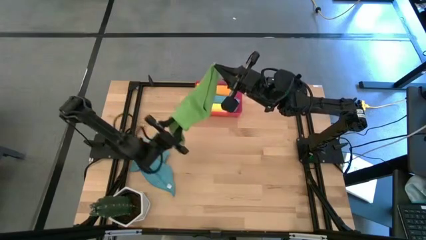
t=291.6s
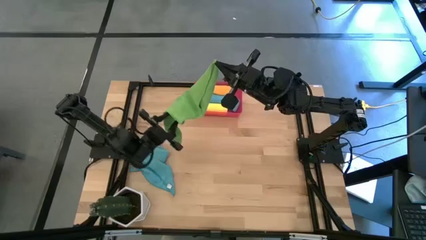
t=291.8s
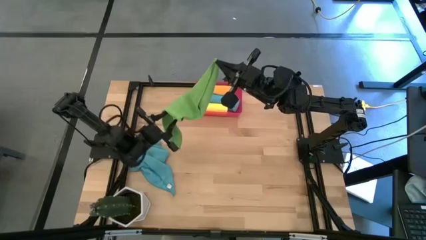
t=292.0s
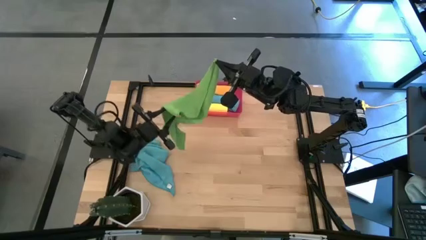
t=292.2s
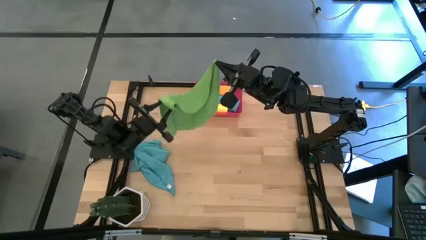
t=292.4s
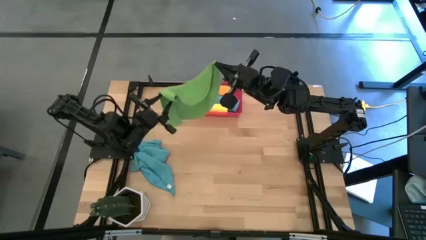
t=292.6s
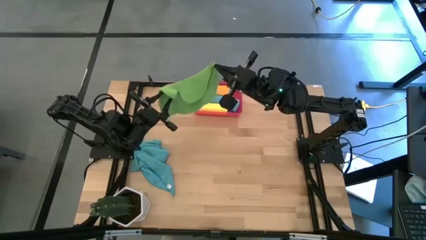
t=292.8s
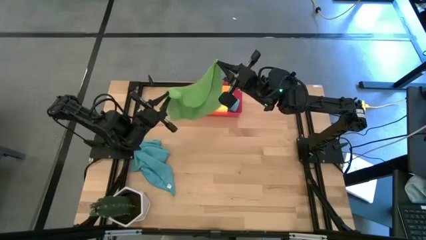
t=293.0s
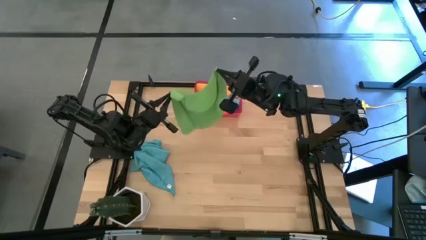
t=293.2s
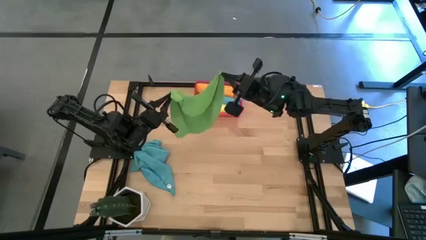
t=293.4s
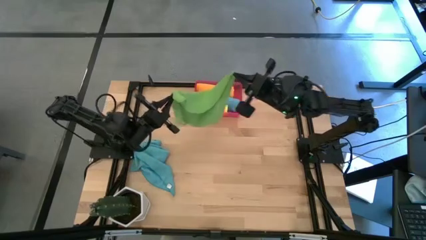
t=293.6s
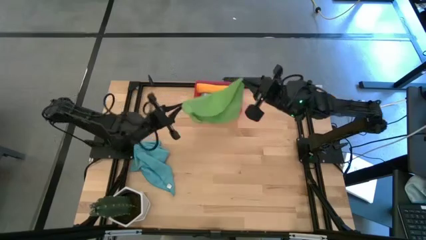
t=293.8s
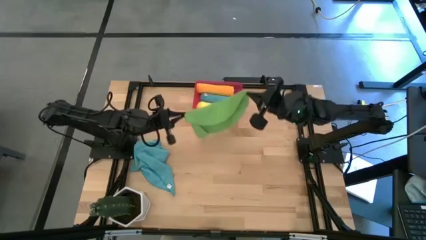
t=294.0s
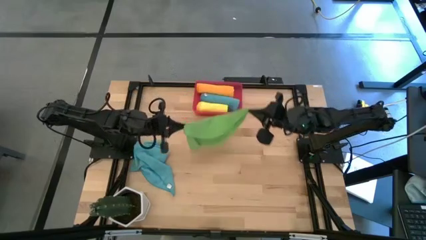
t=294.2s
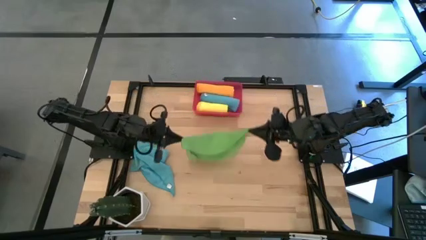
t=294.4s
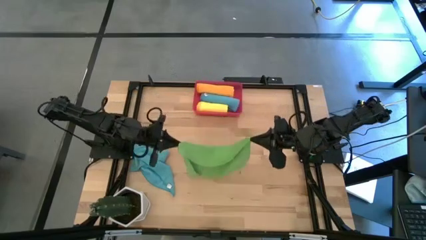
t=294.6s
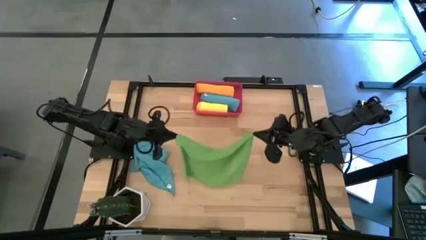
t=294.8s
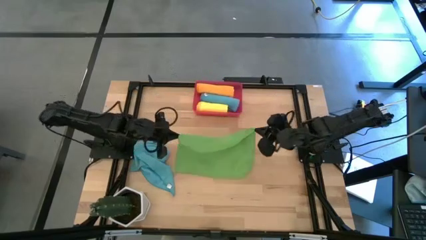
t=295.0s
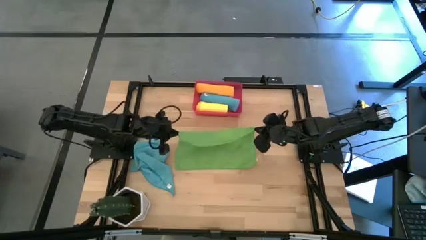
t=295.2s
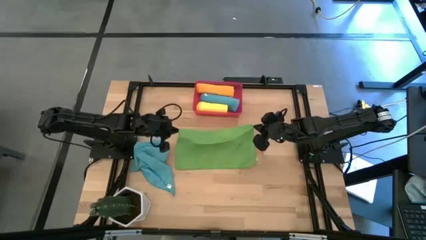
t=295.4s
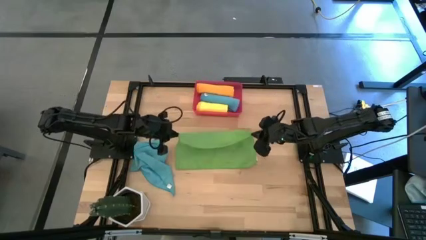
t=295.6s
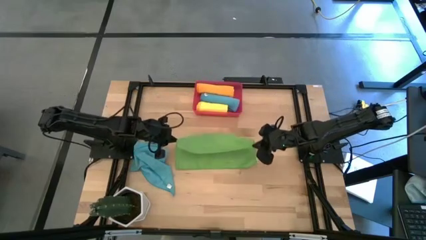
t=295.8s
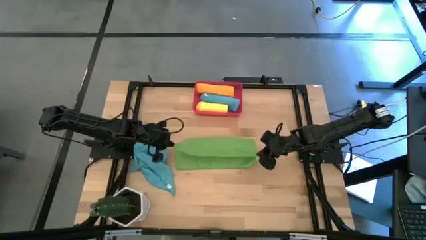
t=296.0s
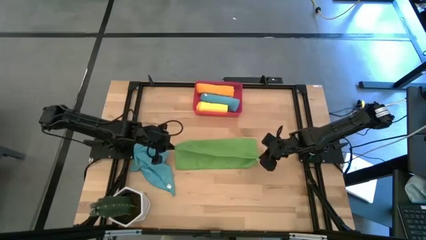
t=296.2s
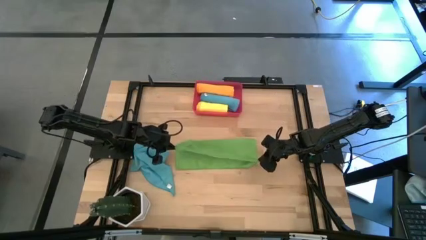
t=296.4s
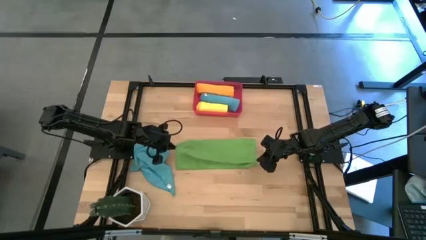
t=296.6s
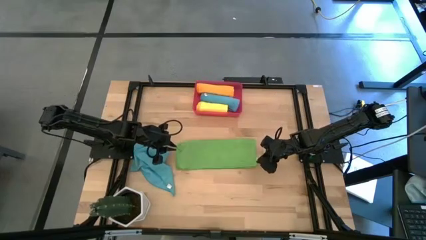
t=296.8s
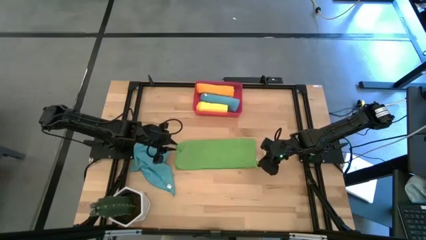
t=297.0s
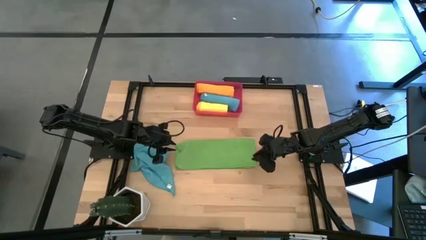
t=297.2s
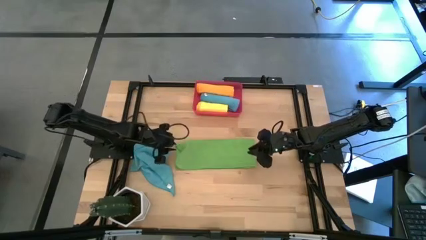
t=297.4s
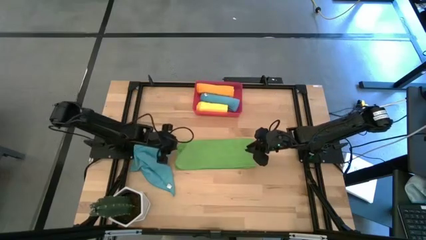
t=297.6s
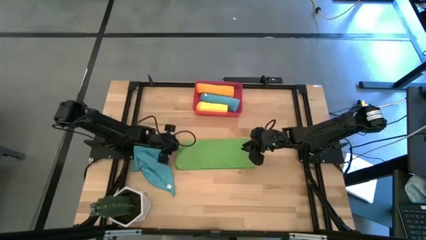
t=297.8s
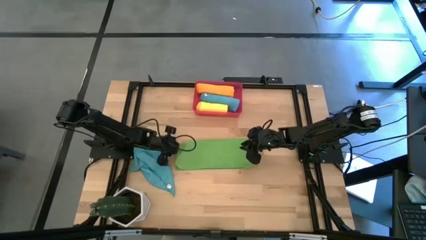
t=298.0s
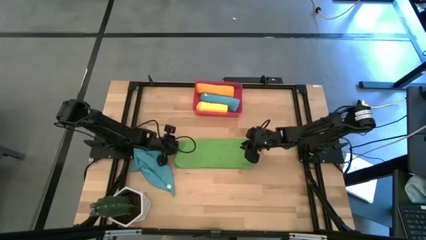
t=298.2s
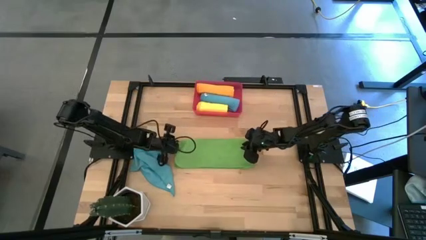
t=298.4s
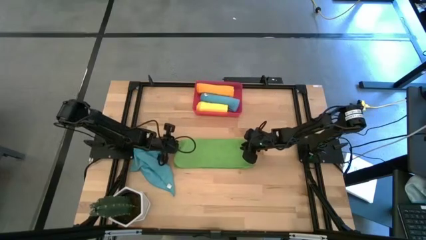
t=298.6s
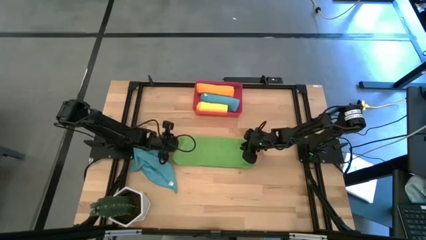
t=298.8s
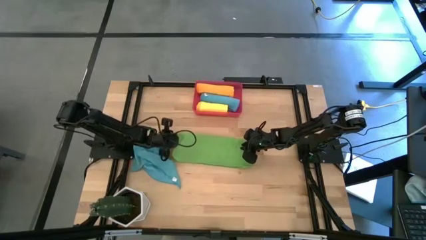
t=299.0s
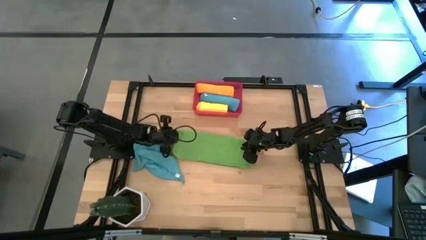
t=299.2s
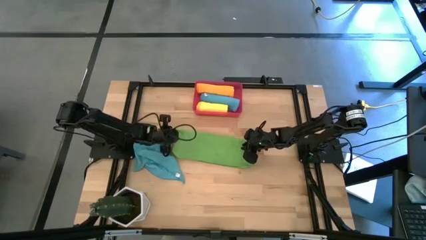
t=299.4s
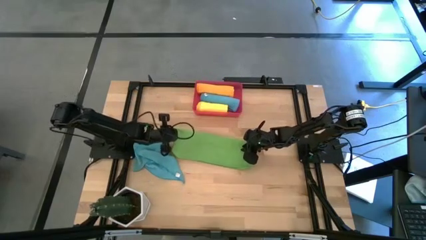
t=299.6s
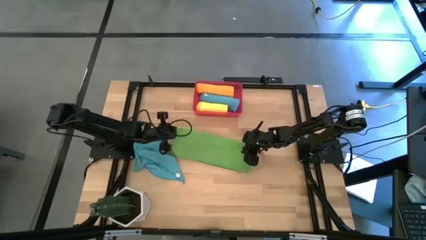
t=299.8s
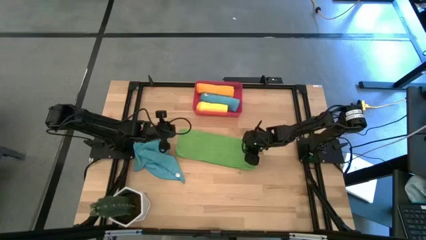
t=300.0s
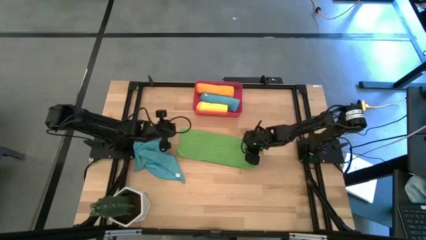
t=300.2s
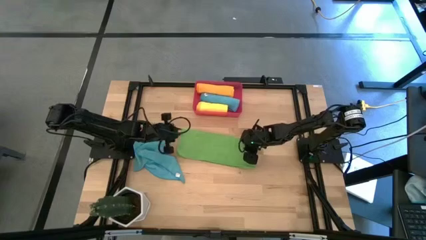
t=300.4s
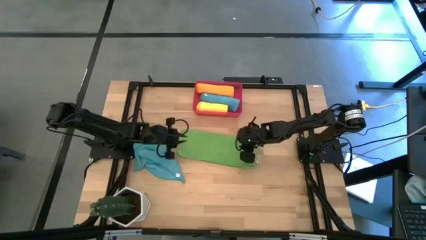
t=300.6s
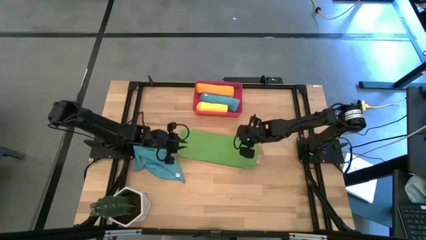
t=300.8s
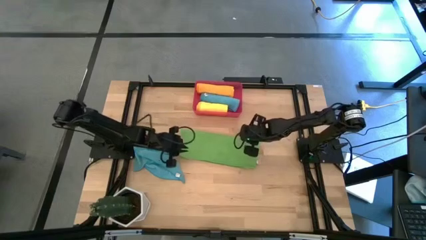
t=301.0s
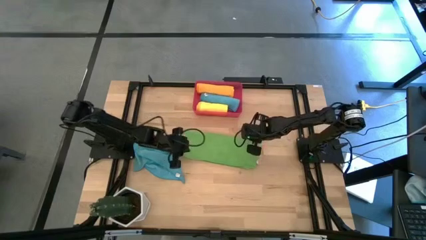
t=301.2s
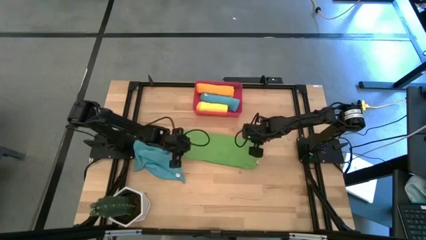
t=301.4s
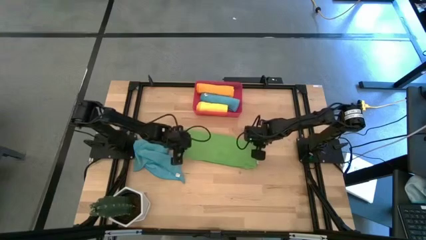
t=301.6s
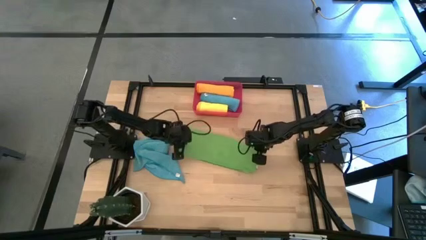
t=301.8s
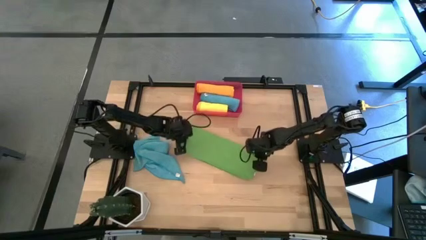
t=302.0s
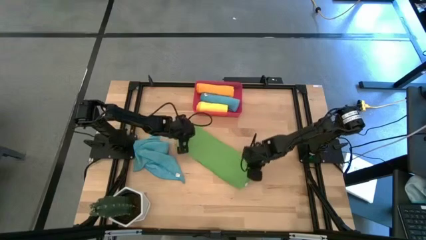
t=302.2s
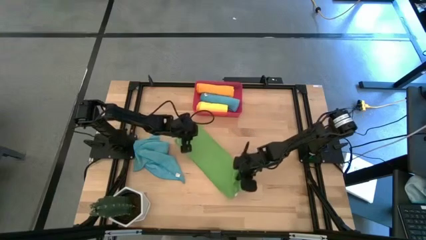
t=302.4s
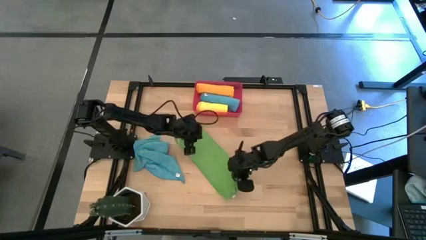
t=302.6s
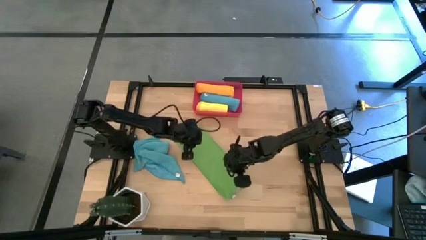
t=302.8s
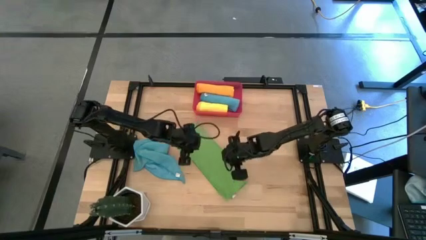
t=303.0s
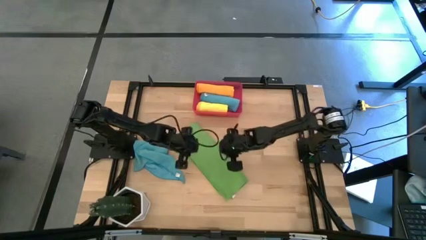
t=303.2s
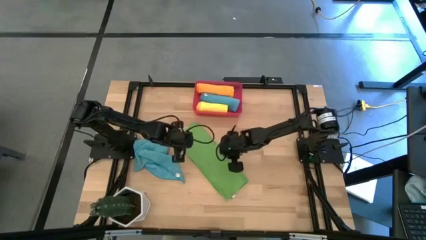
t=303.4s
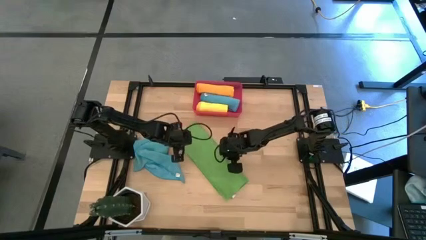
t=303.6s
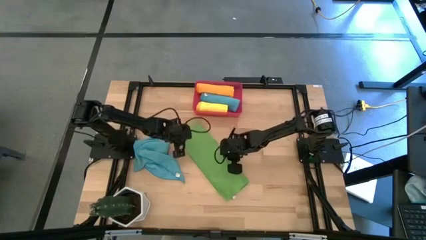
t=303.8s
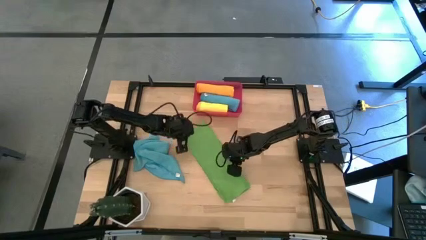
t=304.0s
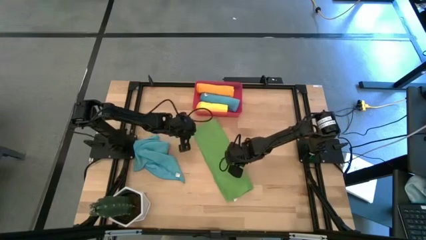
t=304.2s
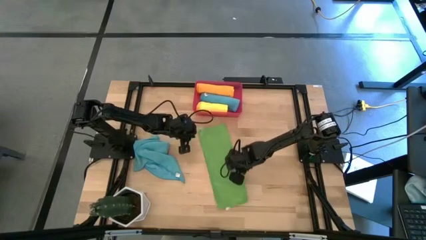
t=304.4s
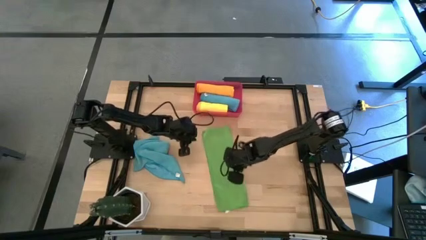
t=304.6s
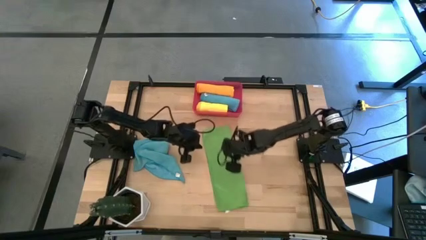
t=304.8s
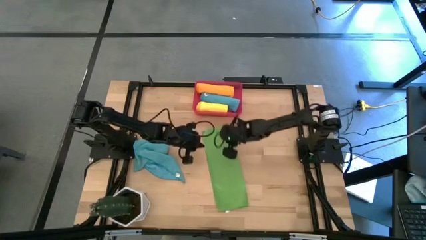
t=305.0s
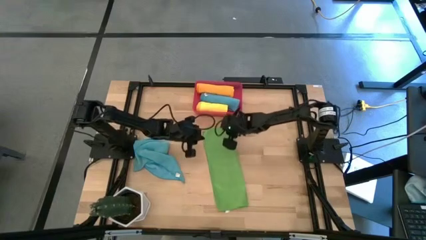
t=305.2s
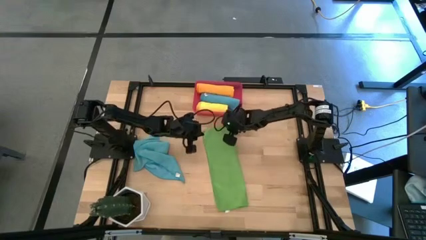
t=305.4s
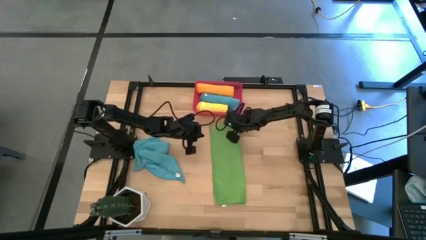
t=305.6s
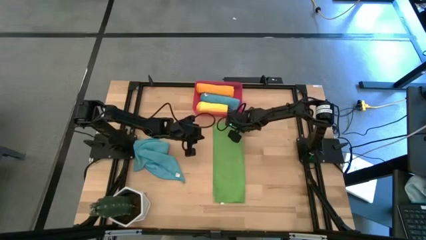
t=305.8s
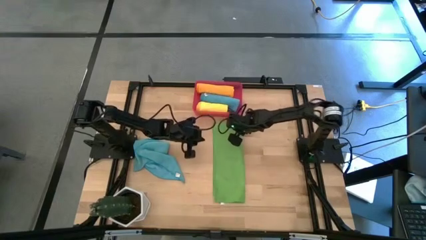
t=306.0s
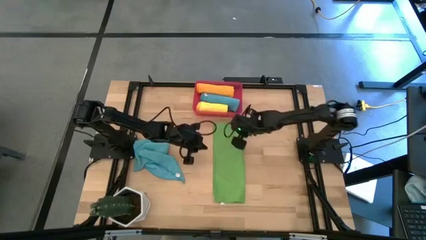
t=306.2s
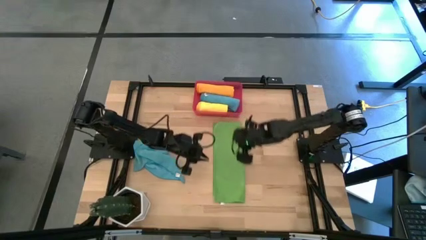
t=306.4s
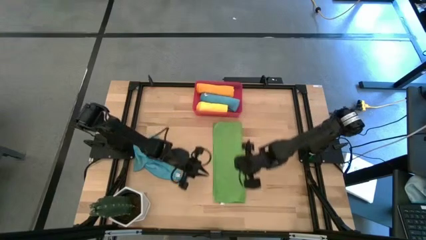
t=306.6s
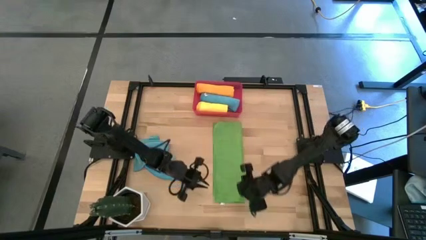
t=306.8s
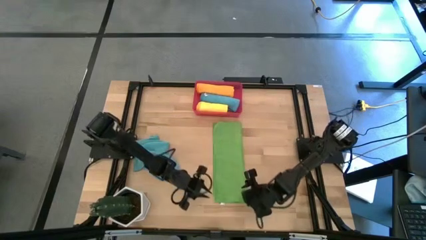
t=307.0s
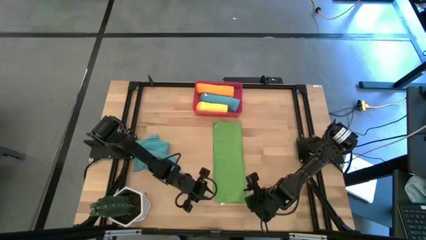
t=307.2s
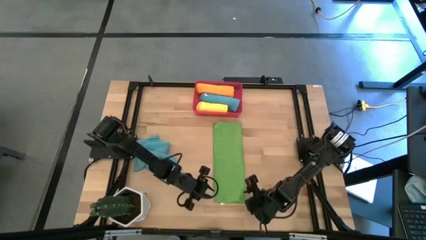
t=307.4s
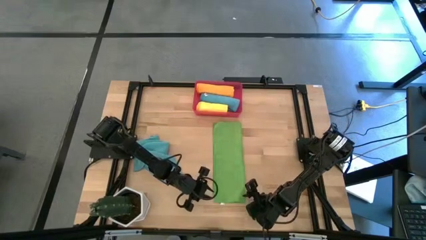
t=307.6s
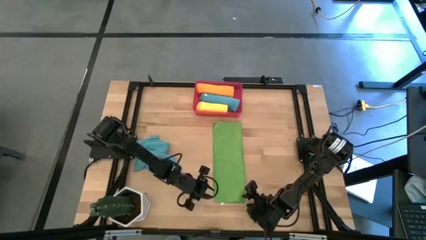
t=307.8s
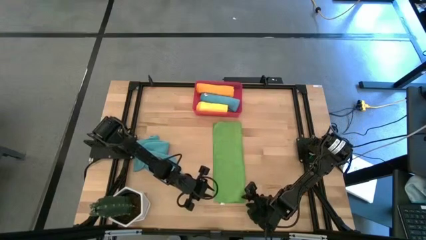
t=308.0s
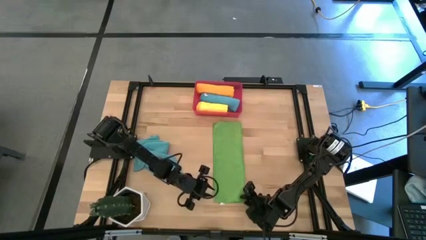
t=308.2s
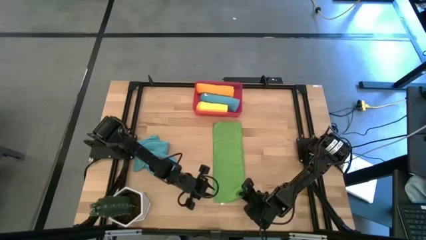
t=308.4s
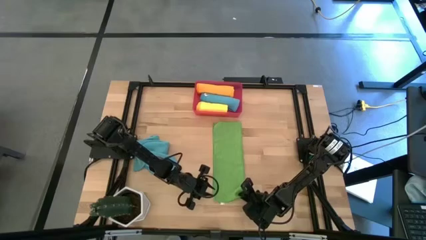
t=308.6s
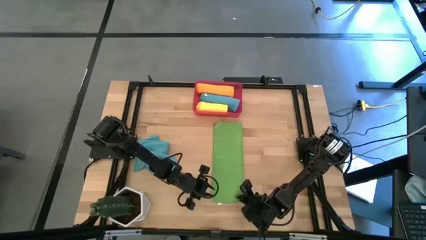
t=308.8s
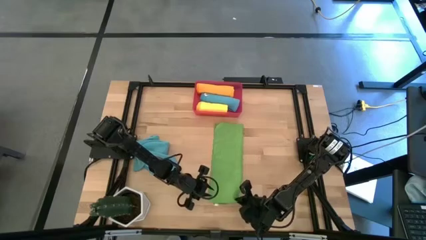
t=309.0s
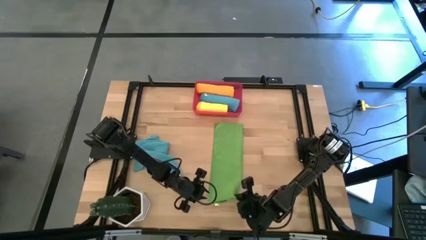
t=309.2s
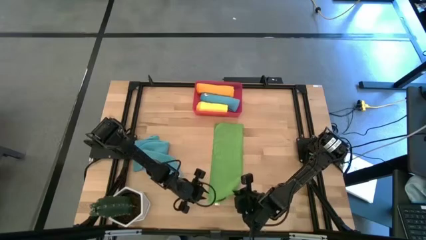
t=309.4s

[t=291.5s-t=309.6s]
Task: Roll microfiber towels into tight, uniform cylinder then place into a basket
Roll the green microfiber cloth
